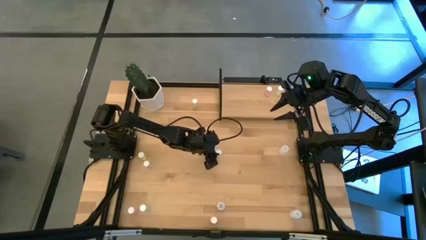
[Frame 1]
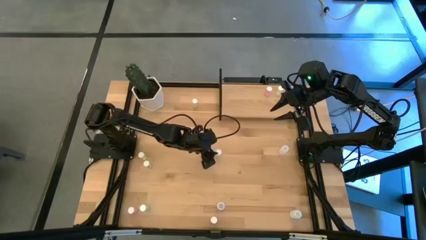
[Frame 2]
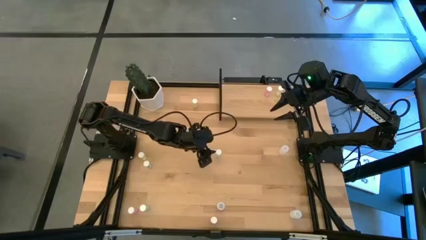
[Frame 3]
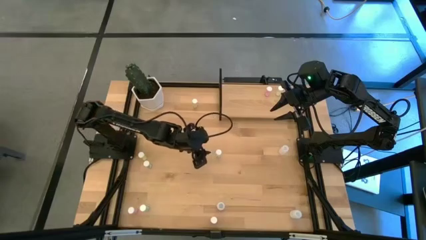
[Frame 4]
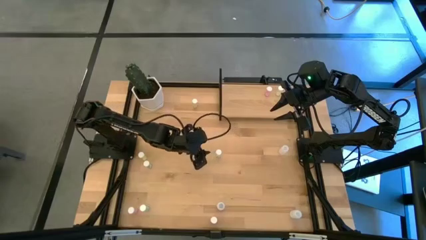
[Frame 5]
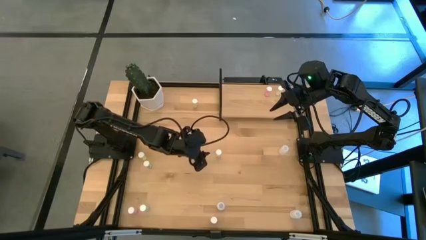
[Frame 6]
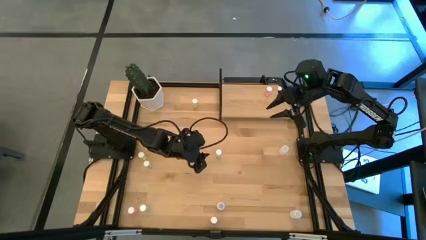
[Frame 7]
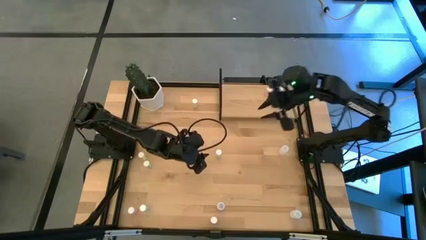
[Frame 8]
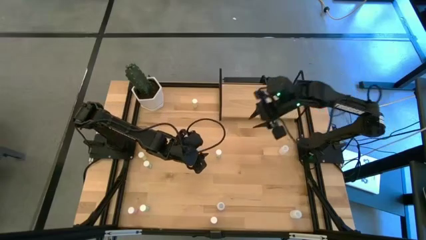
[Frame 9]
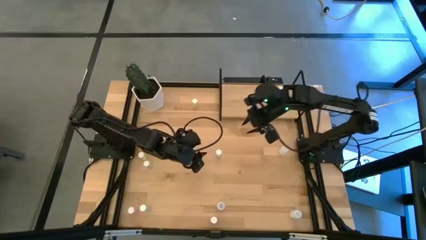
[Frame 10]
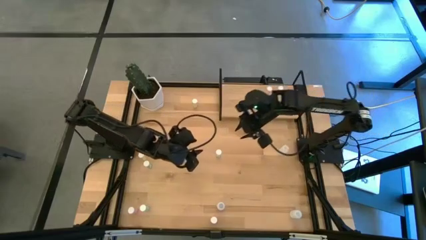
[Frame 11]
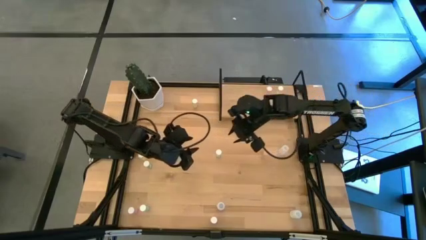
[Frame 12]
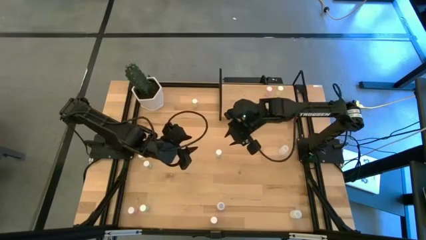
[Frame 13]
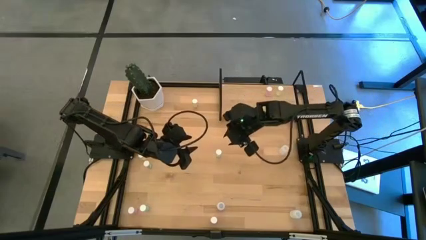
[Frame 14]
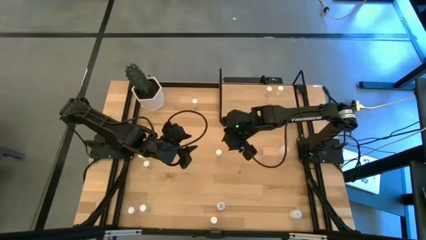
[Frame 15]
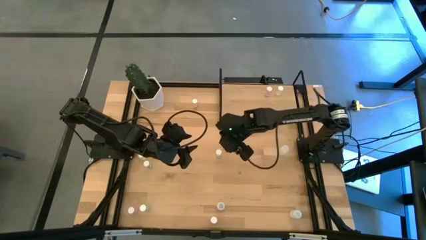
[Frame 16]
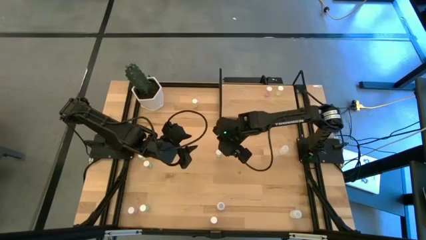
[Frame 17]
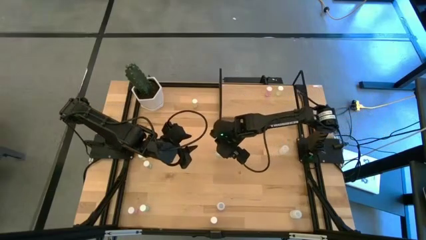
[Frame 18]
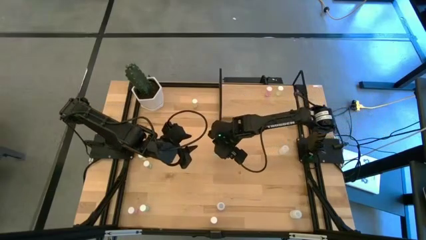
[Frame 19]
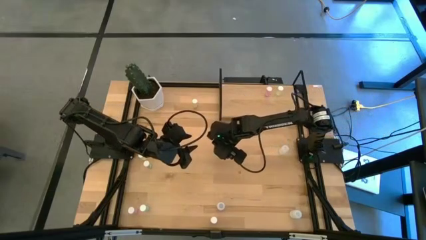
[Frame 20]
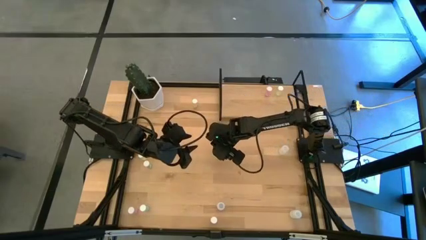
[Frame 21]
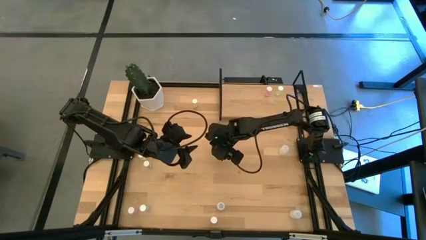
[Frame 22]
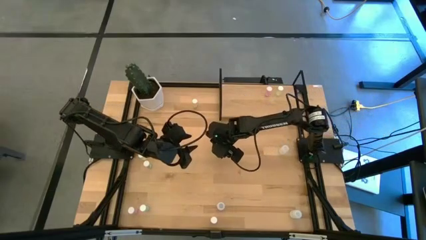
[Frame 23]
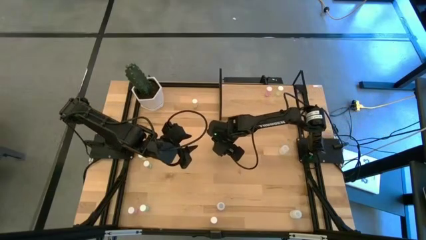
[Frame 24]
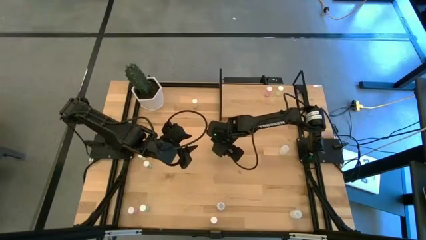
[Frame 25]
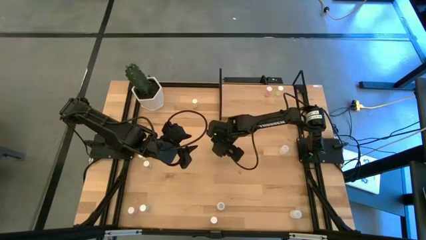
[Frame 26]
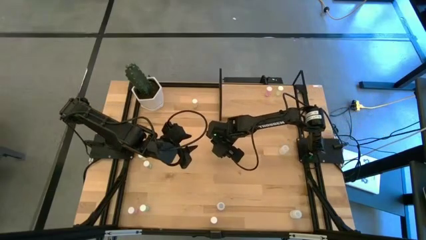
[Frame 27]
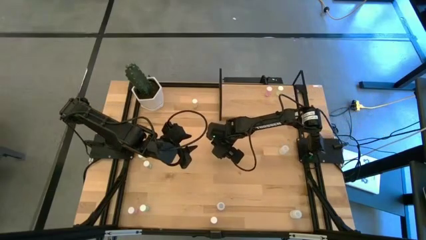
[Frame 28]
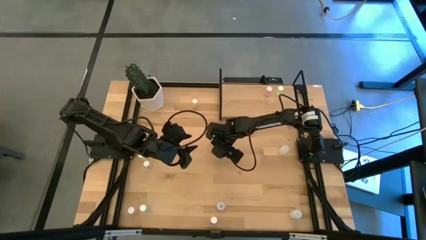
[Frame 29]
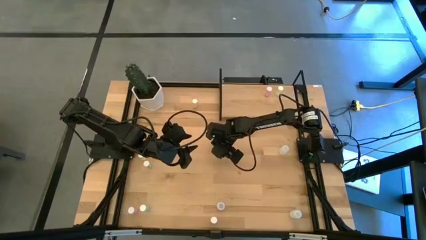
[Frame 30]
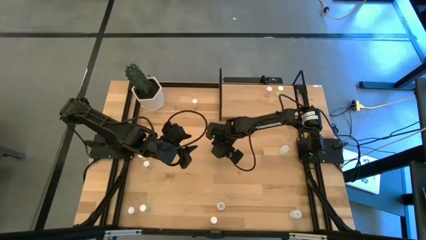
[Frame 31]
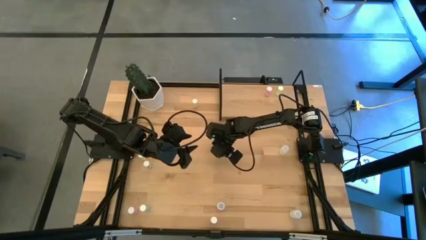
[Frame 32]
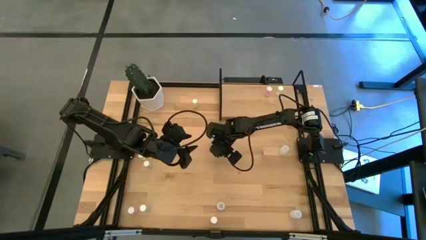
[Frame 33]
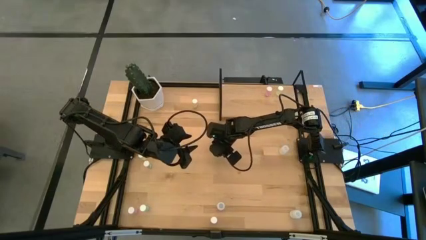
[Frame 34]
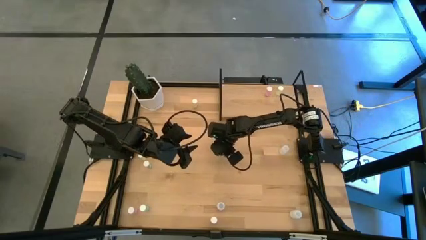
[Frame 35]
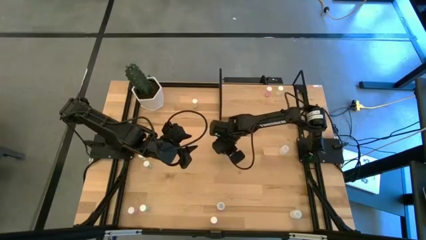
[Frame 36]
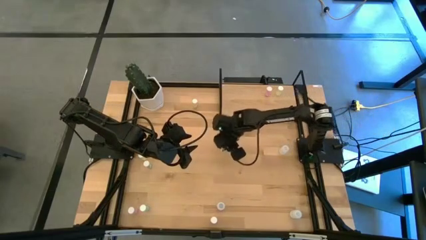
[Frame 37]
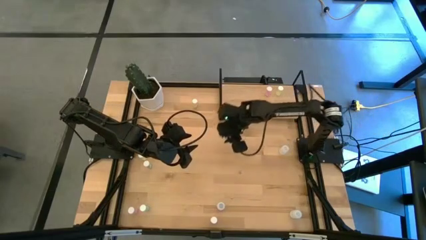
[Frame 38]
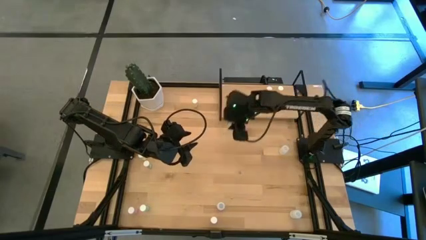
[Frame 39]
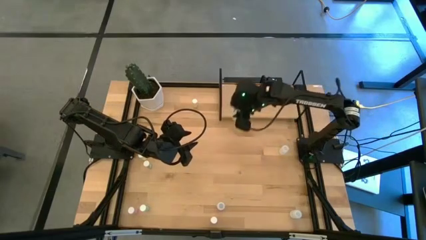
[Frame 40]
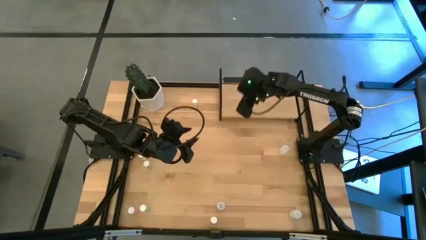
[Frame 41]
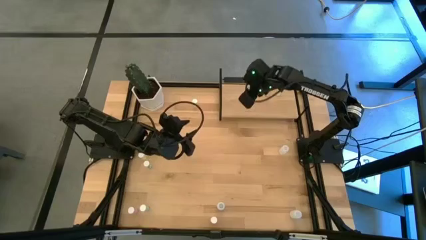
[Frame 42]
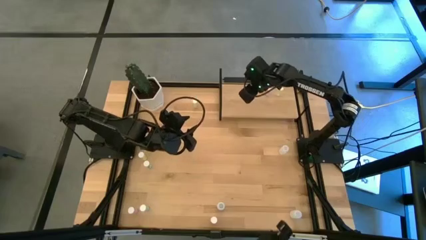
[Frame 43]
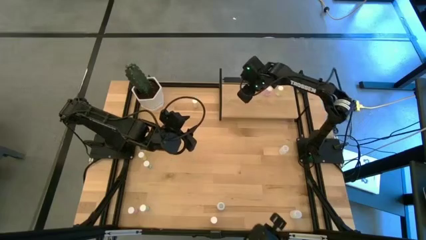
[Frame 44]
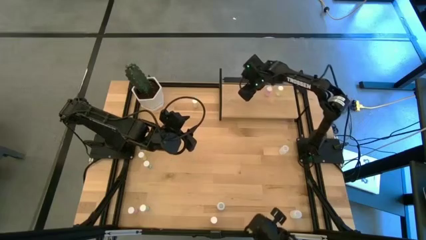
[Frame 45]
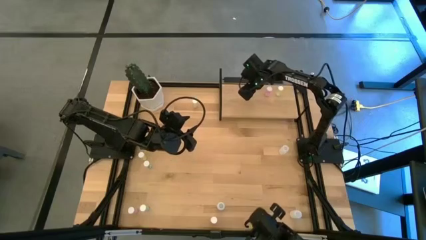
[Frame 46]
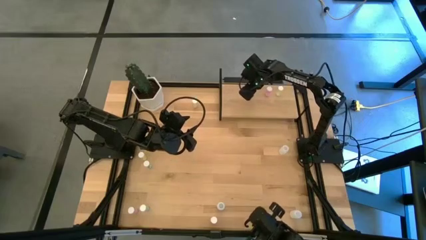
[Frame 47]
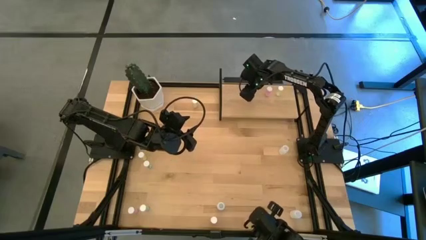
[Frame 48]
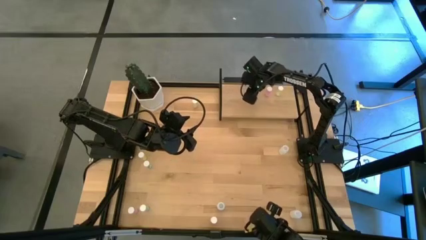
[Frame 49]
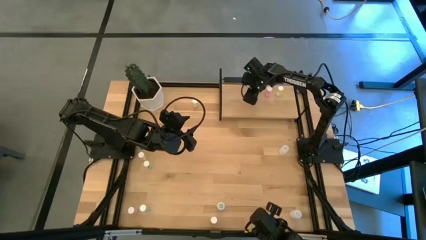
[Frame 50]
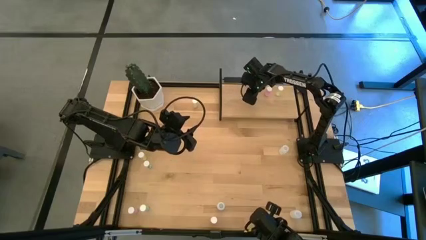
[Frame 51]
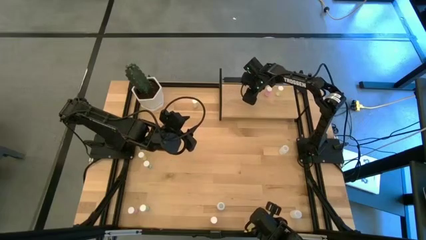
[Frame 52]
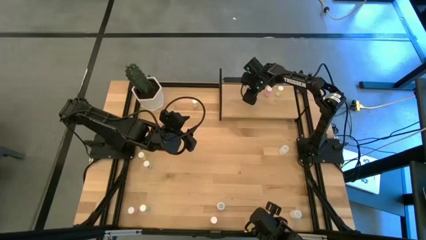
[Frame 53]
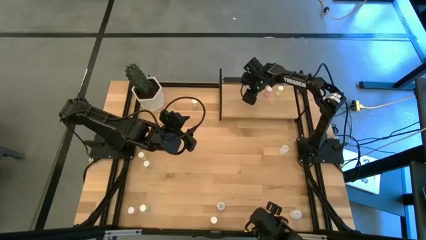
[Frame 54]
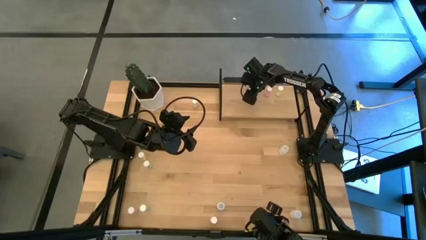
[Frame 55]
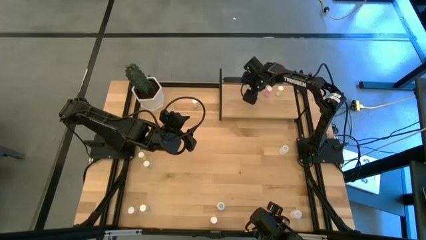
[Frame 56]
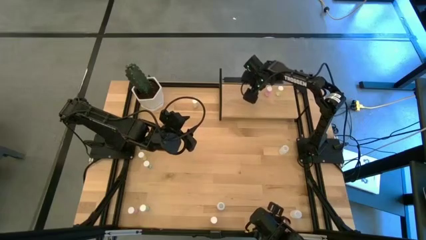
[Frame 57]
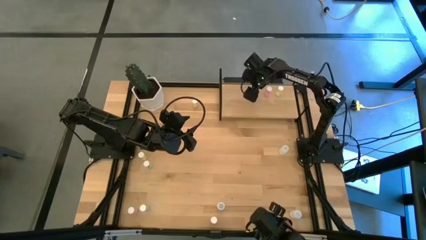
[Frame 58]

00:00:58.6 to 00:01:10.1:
Task: Pick and place medicine bottles onto shelf by color
Put the top green pill bottle on the shelf

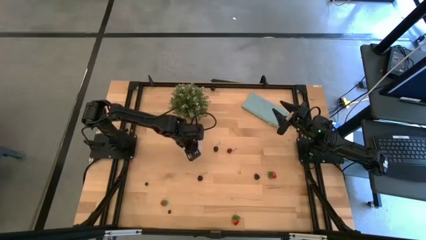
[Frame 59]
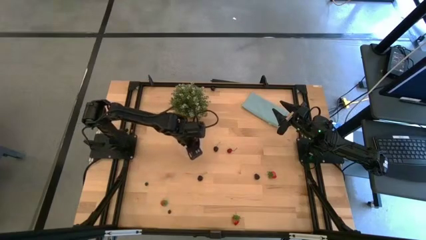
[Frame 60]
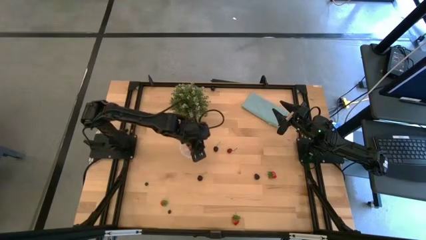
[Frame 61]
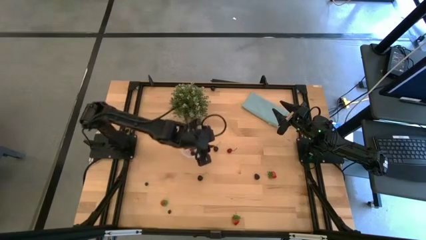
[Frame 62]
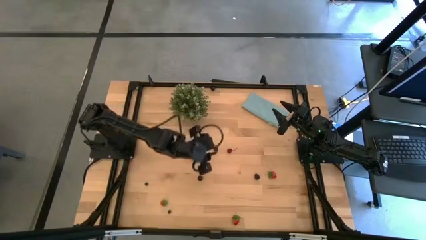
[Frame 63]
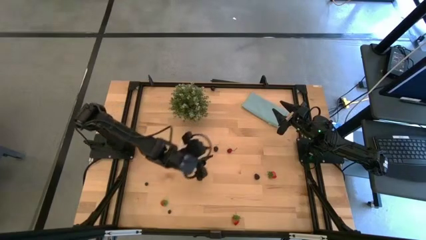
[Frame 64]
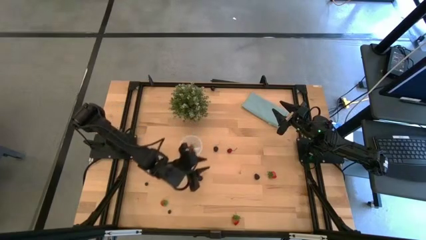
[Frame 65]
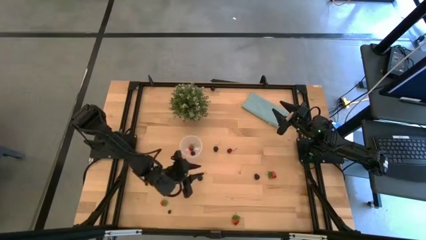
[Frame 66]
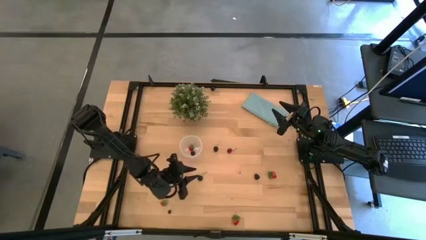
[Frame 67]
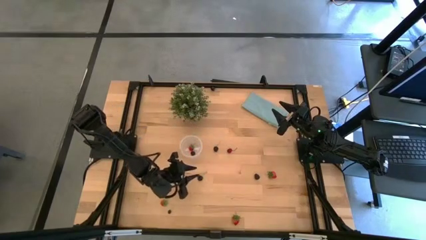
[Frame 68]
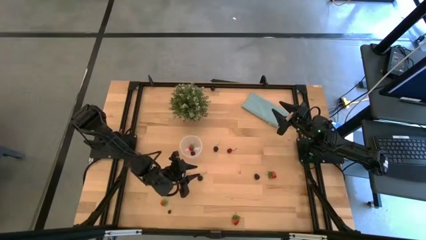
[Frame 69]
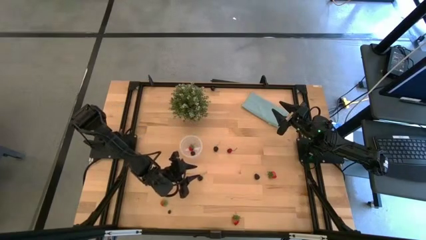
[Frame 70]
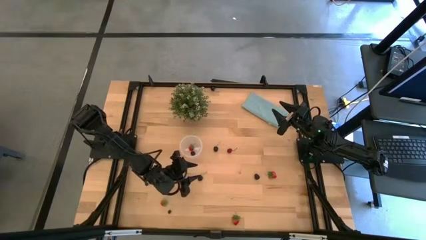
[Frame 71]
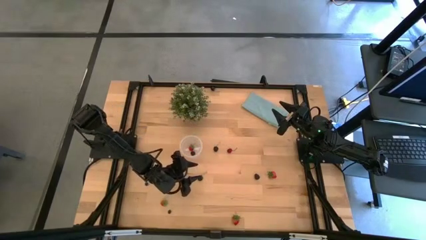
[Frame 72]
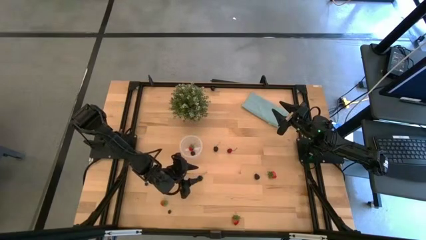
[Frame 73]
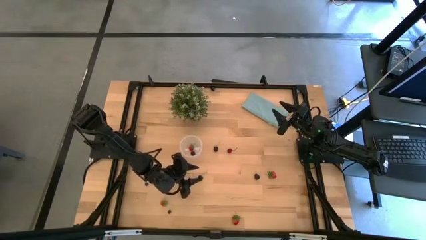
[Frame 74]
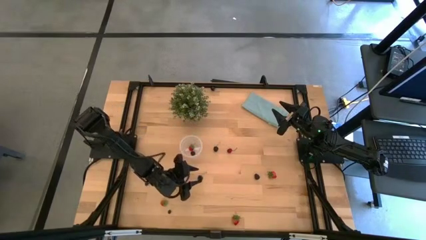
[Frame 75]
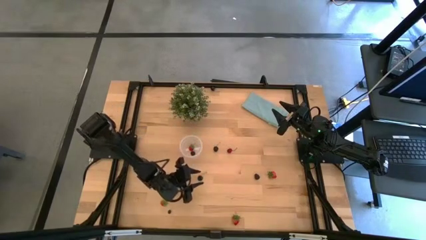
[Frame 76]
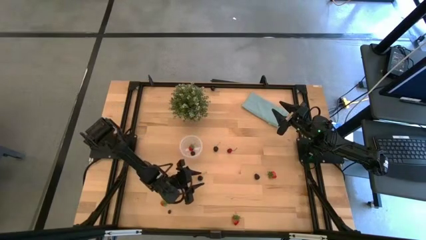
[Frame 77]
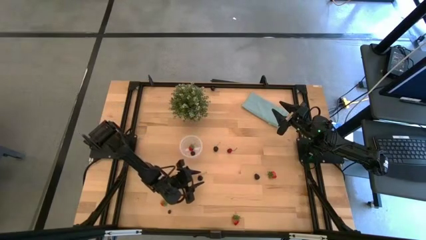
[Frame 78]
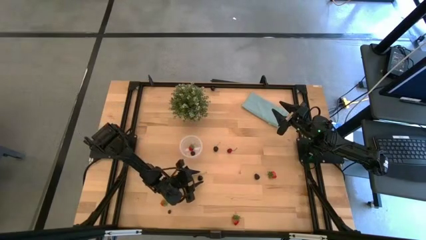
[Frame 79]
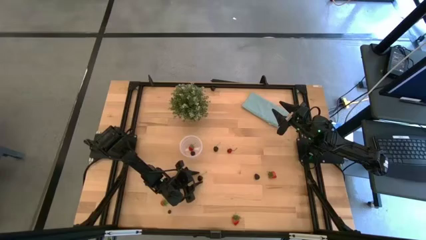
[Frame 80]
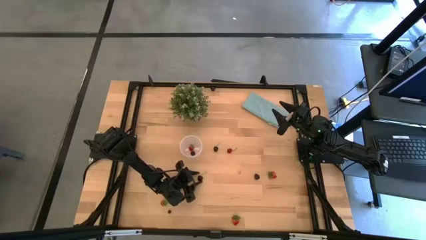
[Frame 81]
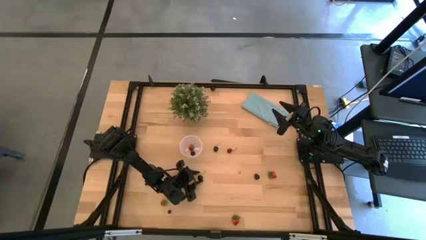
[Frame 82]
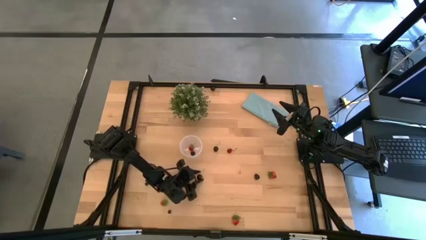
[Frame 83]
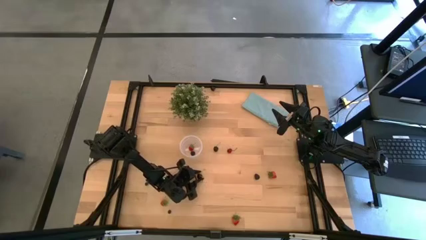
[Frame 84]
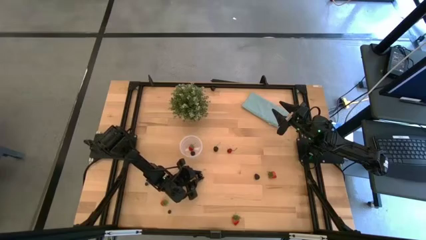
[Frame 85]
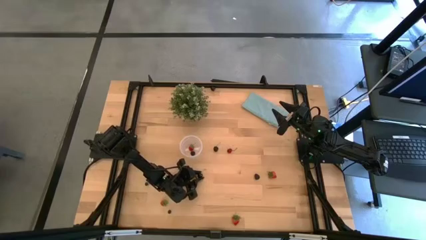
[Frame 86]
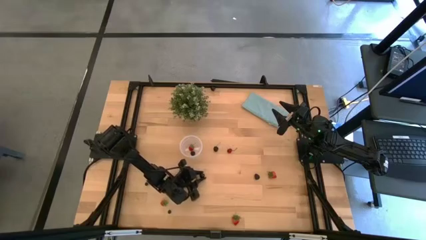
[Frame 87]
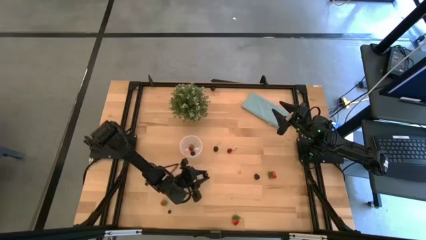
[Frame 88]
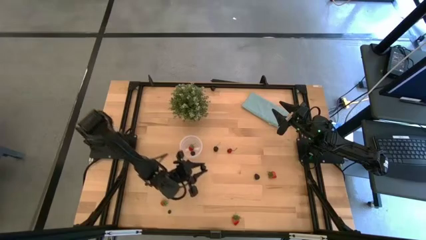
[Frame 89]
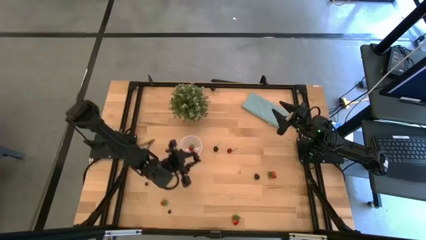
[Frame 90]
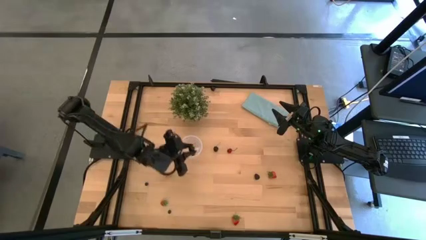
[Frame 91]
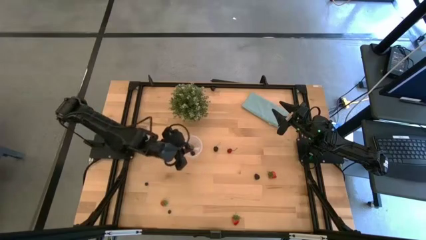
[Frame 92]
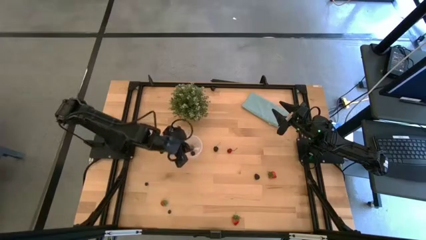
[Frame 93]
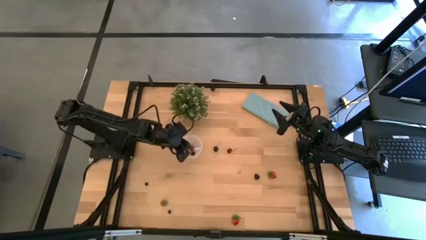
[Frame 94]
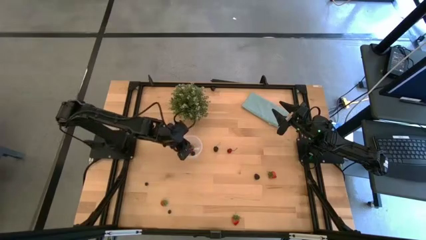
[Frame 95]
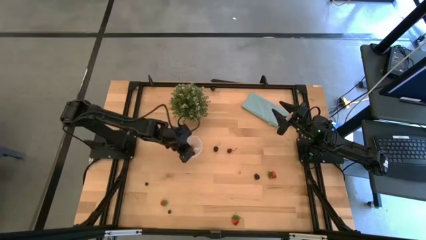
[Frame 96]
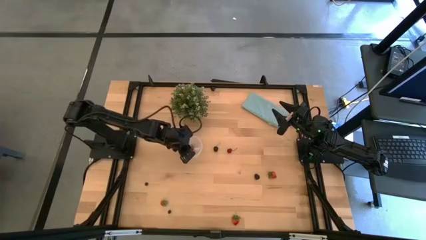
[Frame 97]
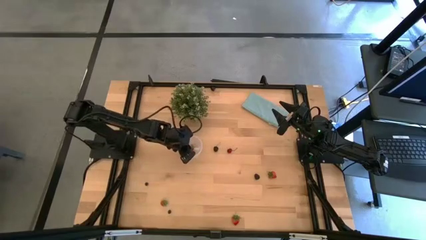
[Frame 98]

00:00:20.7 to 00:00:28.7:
Task: Pick and placing Produce into tupperware
Put the black cherry into the transparent container
